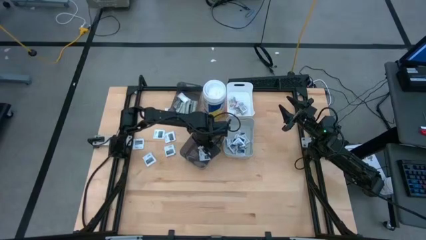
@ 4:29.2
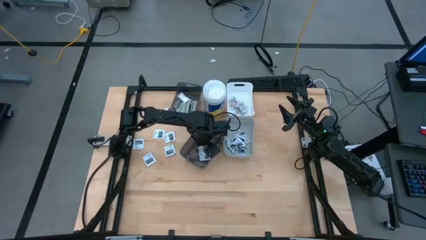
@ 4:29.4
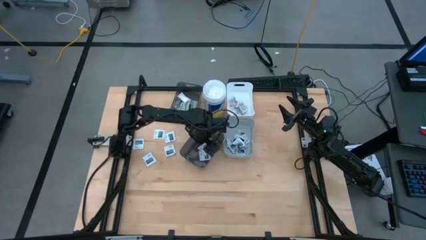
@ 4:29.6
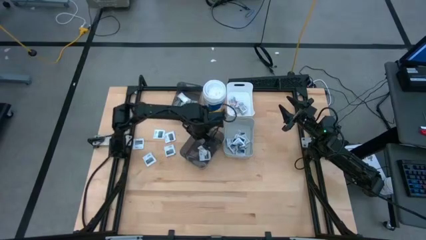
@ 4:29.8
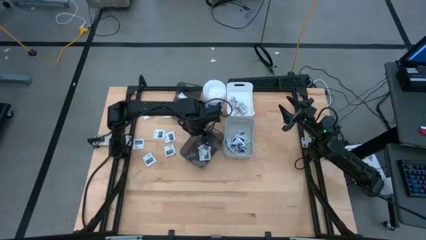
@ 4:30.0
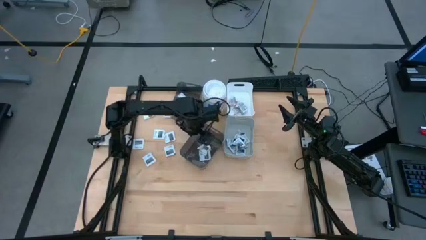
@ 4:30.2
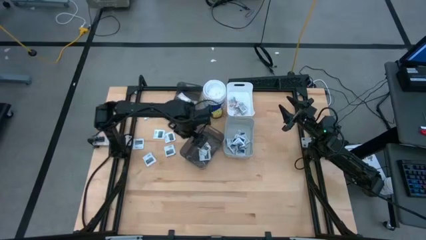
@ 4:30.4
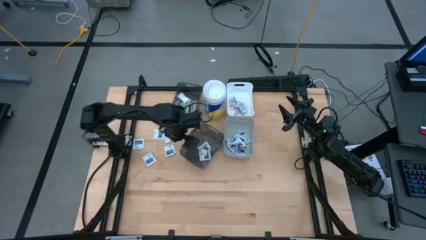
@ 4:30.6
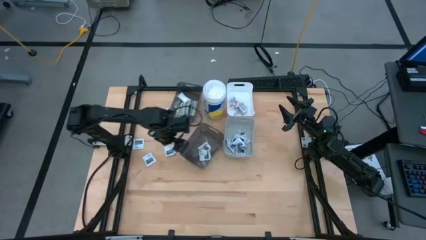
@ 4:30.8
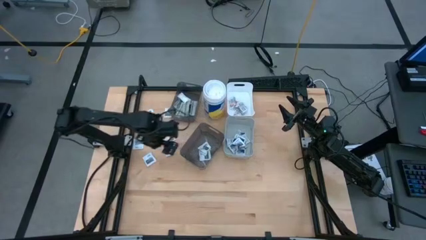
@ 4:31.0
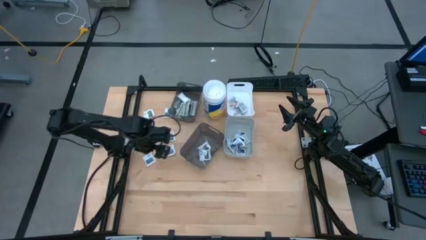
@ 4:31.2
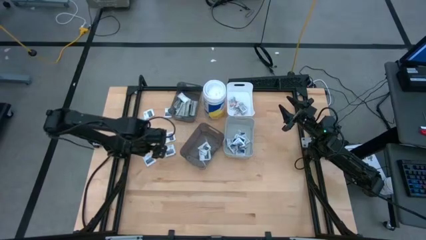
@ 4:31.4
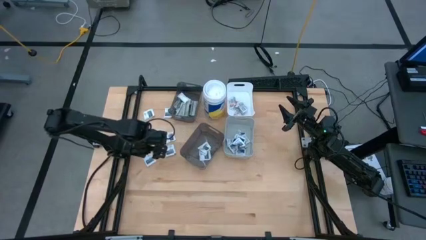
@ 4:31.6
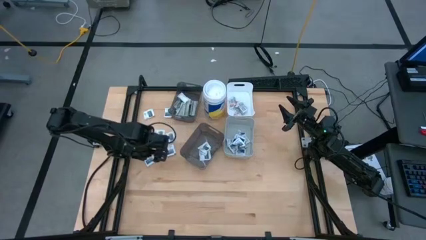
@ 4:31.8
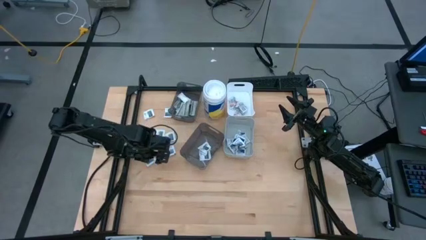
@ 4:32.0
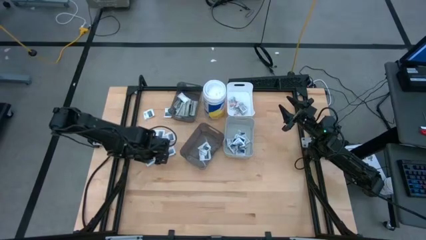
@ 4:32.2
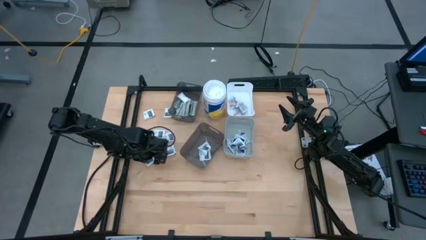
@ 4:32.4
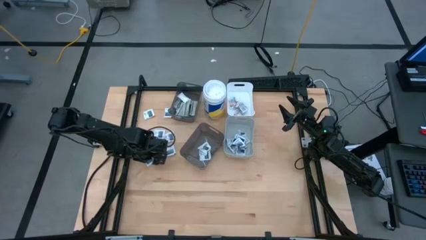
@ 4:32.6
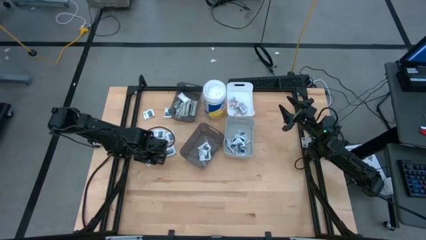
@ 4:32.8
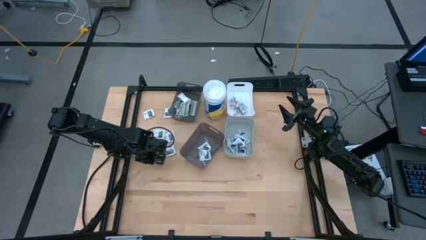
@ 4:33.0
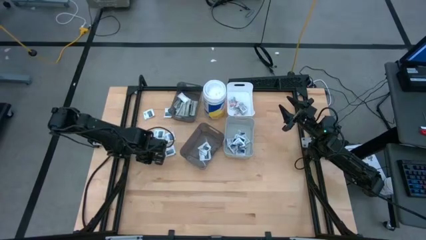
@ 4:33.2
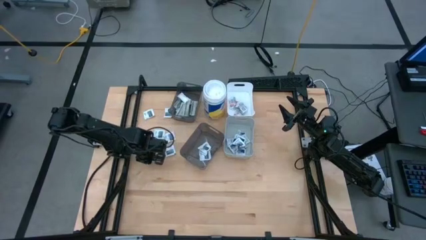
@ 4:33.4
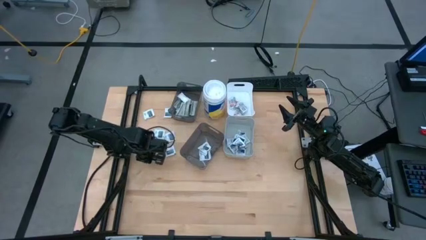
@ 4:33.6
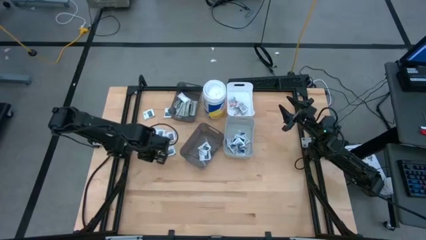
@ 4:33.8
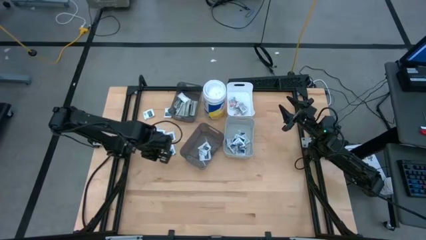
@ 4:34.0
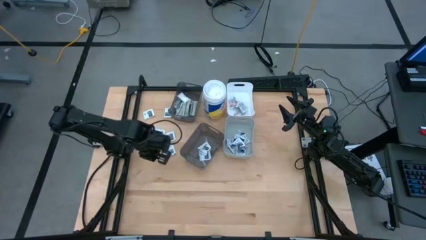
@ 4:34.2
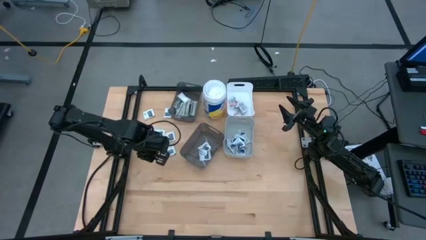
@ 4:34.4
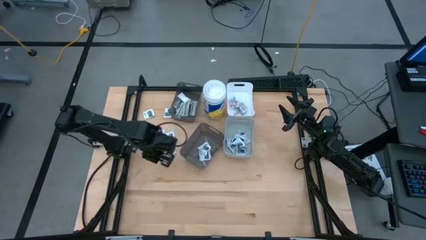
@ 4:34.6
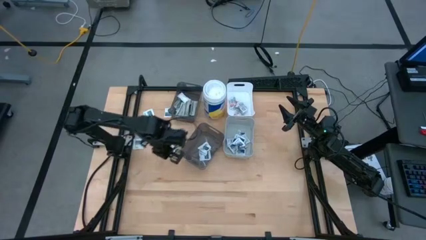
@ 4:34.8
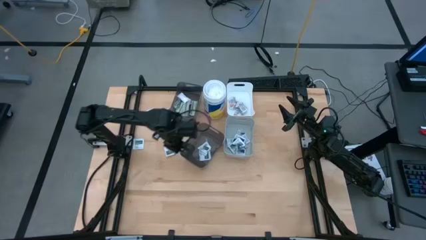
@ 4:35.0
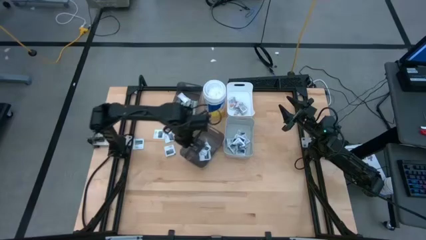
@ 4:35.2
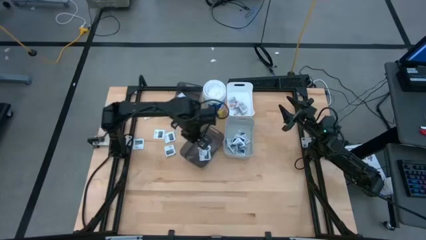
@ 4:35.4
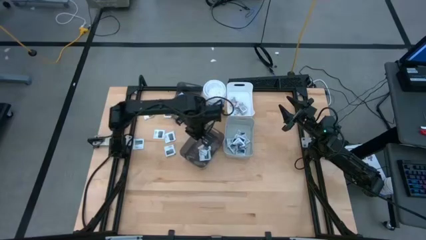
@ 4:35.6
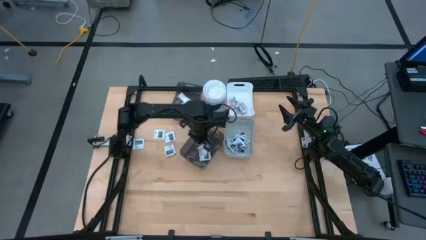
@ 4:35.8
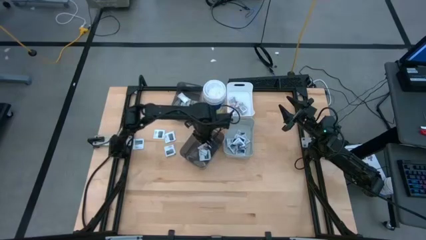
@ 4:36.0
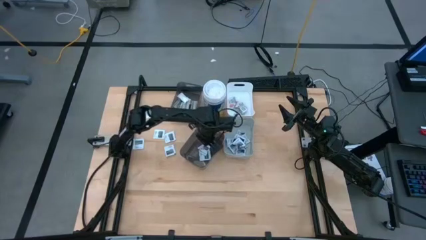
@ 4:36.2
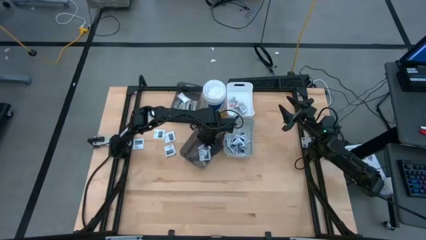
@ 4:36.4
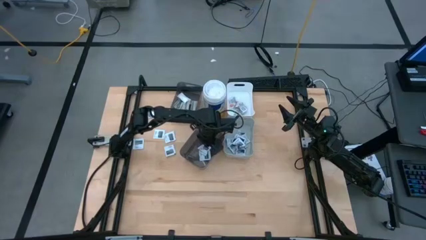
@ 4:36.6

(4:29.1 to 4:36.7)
Task: Pick & Place First Aid Supplies
Put the towelette pack into the bottom black bin

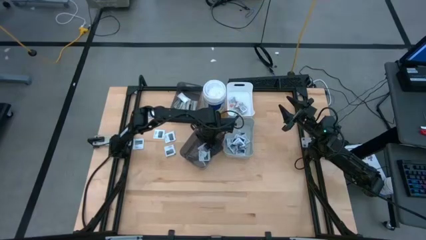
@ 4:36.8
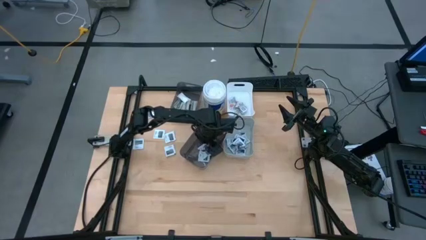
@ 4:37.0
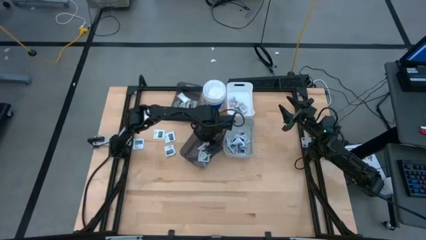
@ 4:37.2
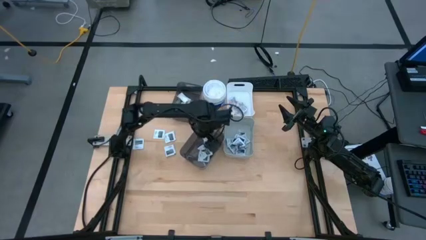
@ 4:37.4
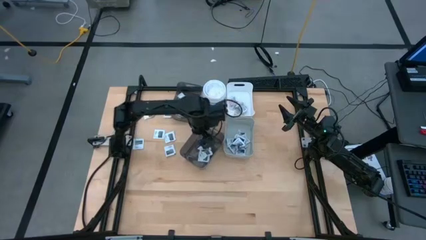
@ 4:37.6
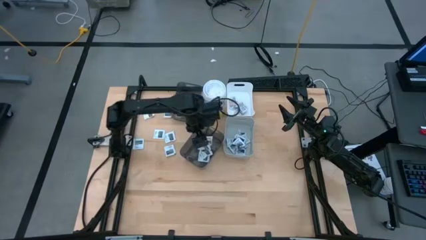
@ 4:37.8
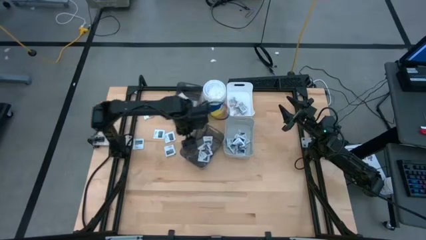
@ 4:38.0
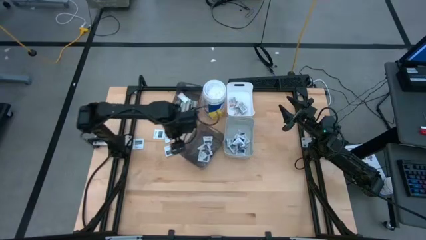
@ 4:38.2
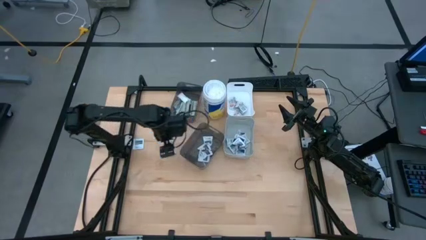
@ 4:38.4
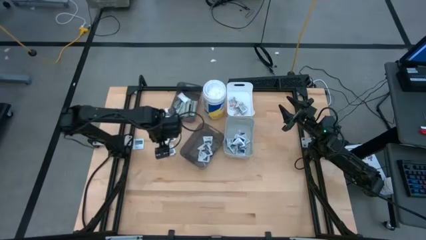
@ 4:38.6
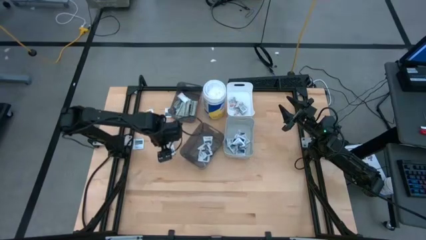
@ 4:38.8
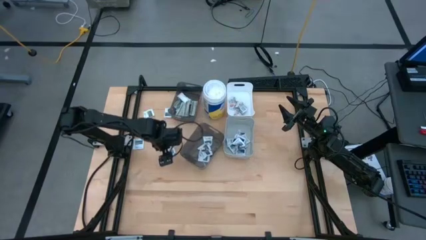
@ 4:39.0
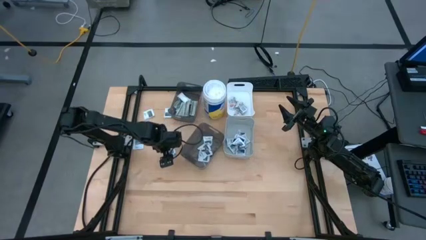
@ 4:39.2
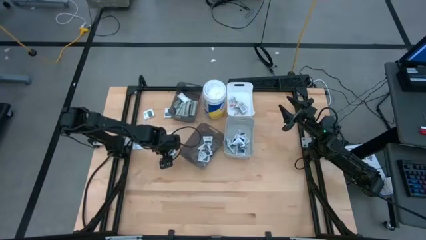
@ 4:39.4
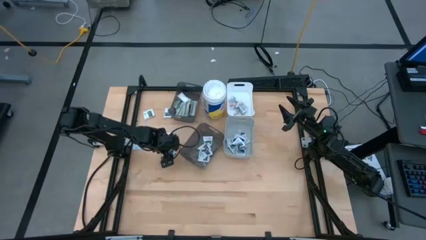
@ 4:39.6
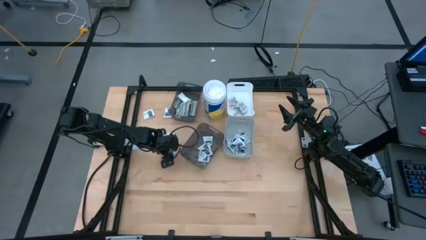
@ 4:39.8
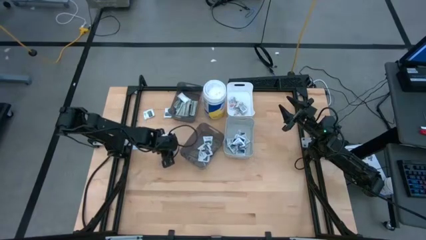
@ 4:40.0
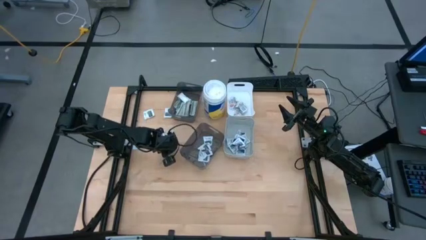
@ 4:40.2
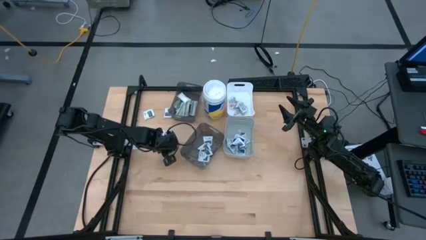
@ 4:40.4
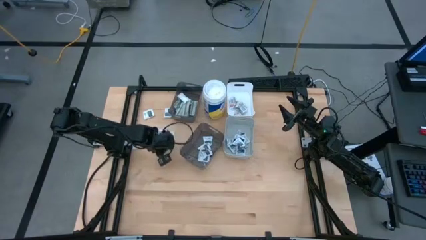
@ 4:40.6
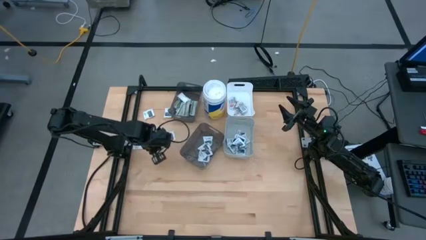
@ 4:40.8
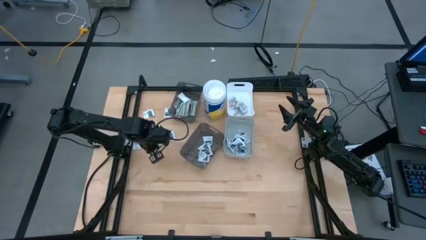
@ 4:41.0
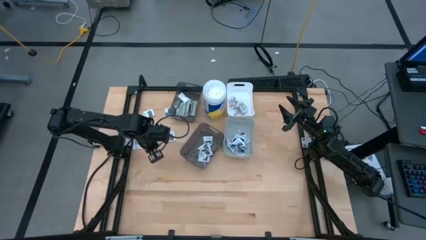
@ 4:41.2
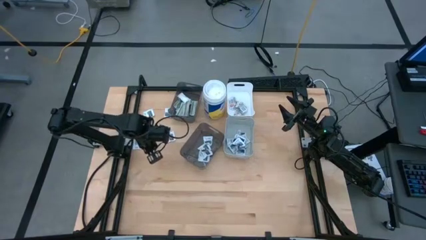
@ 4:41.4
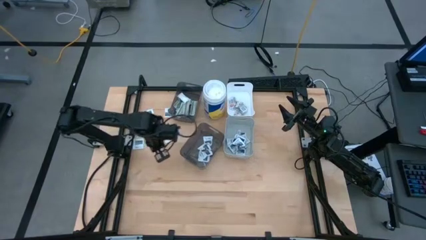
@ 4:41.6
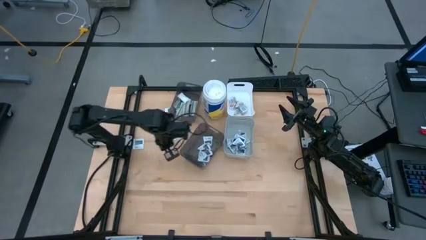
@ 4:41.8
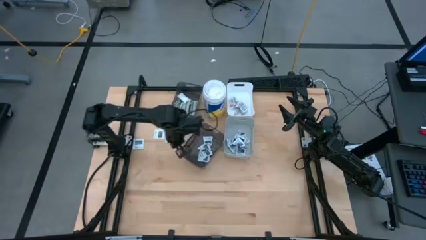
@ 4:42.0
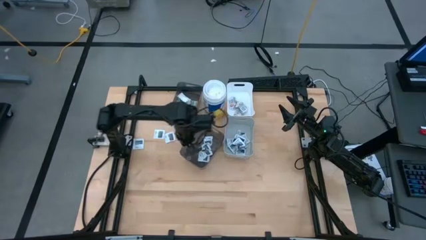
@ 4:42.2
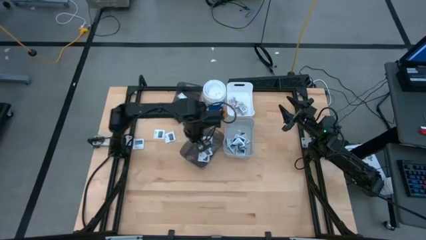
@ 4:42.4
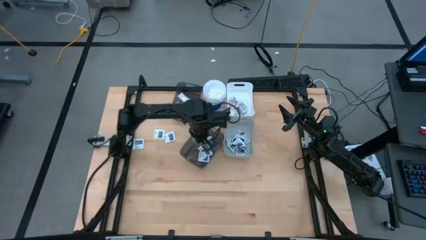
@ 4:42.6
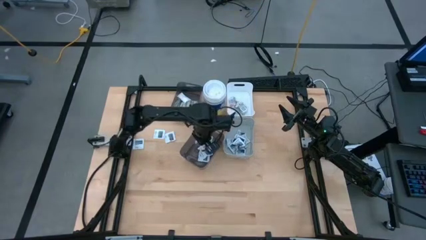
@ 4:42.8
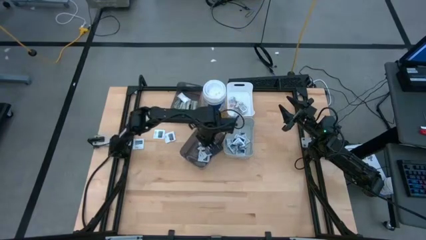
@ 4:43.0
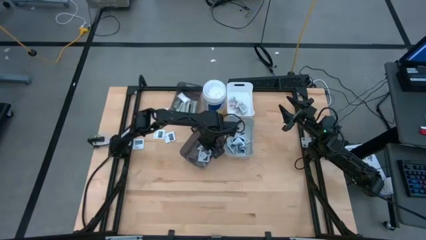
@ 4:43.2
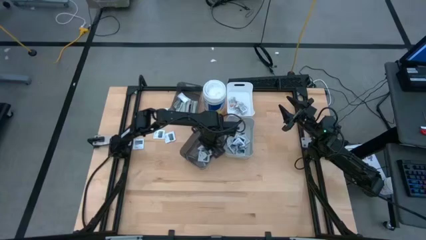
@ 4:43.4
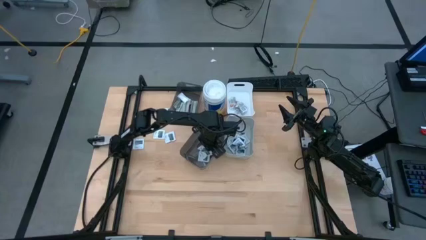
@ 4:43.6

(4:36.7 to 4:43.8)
Put the towelette pack into the bottom black bin
